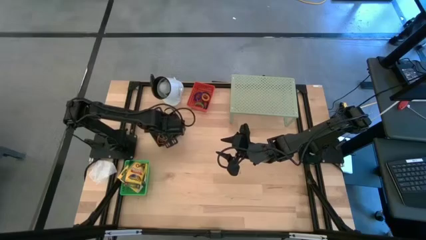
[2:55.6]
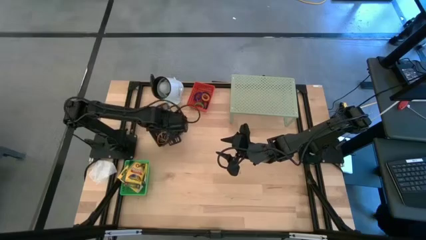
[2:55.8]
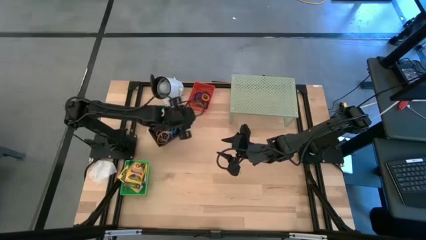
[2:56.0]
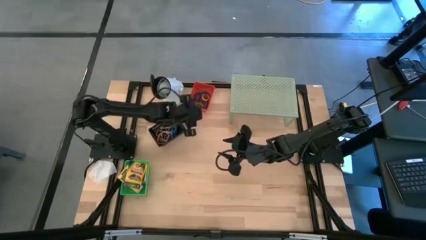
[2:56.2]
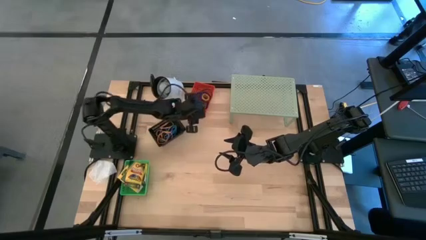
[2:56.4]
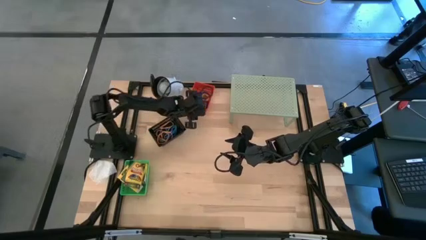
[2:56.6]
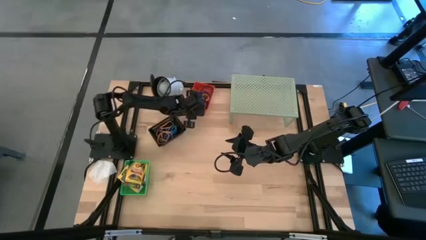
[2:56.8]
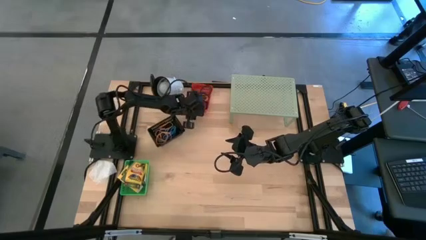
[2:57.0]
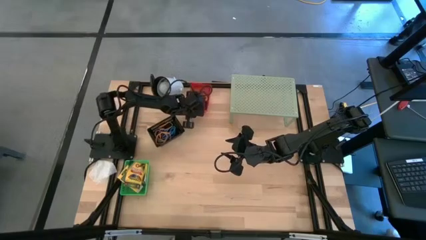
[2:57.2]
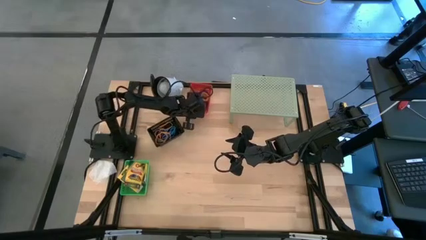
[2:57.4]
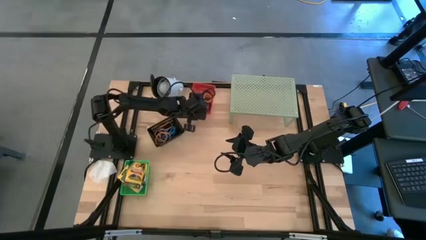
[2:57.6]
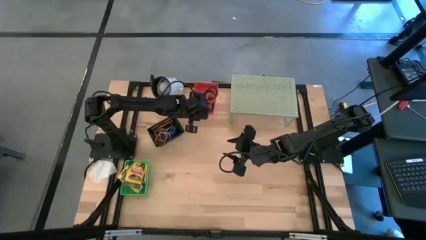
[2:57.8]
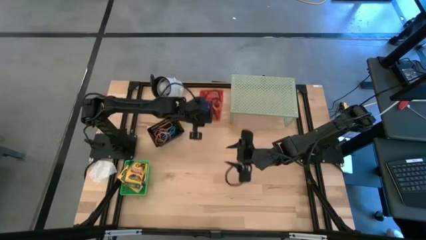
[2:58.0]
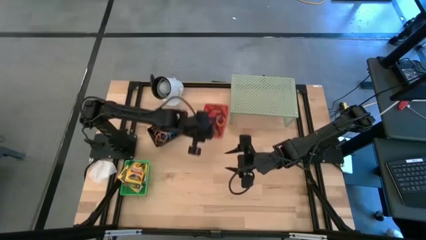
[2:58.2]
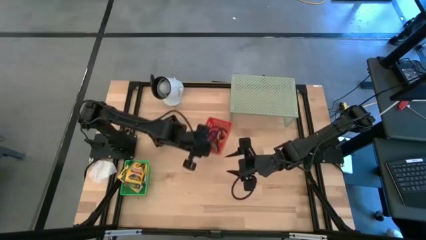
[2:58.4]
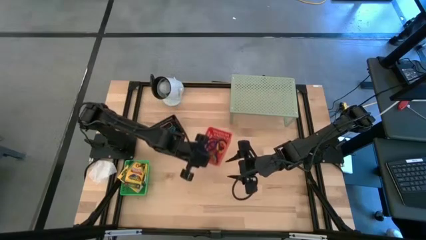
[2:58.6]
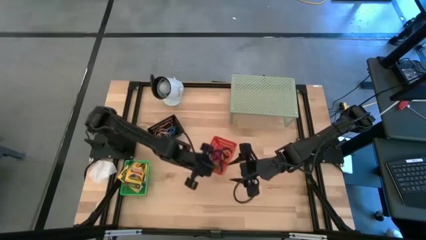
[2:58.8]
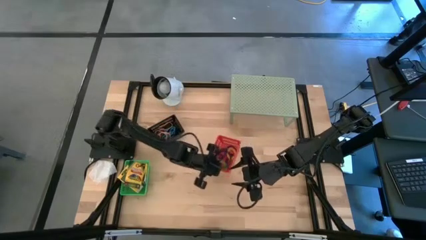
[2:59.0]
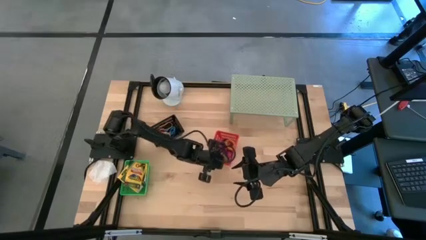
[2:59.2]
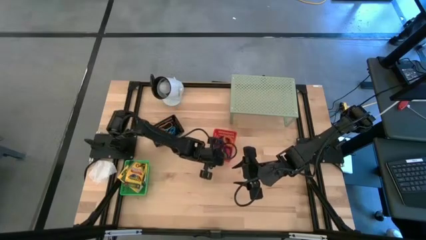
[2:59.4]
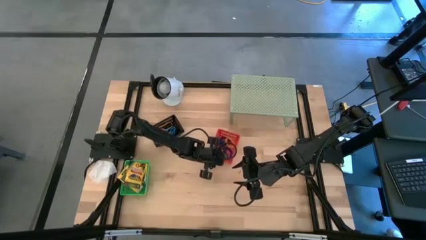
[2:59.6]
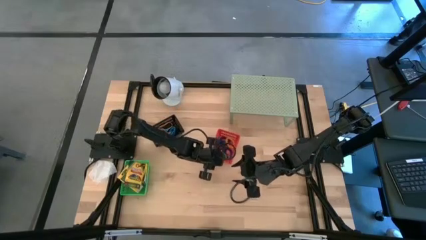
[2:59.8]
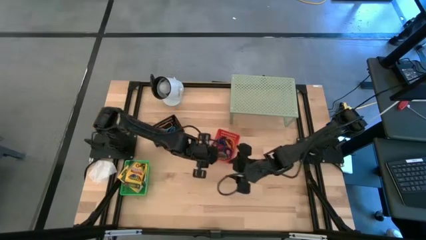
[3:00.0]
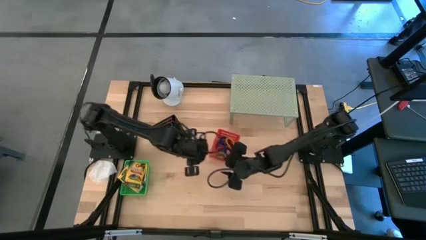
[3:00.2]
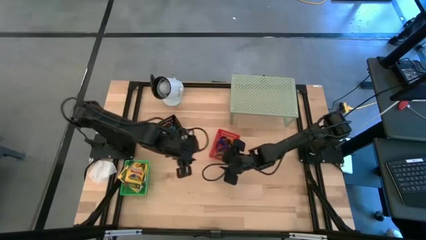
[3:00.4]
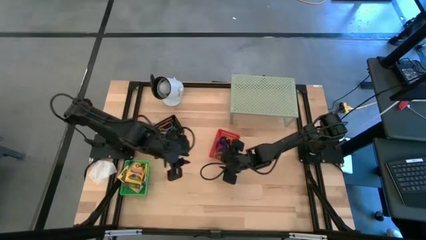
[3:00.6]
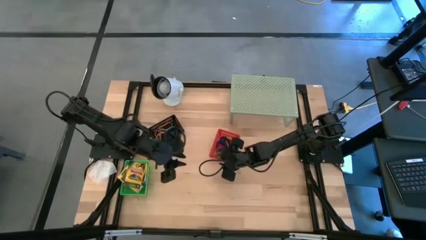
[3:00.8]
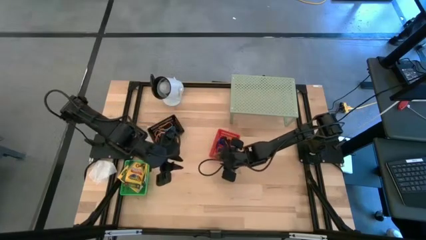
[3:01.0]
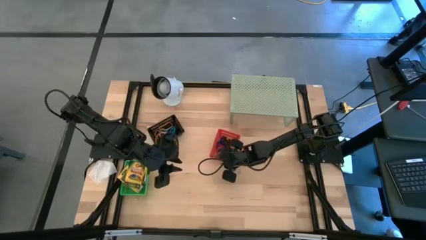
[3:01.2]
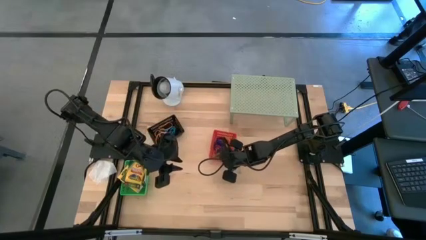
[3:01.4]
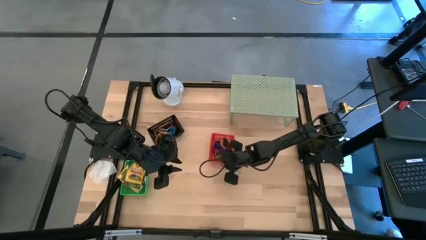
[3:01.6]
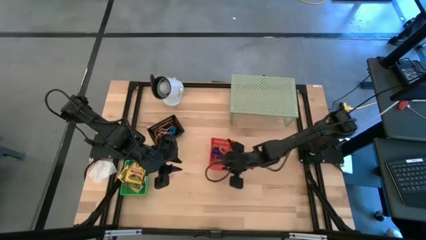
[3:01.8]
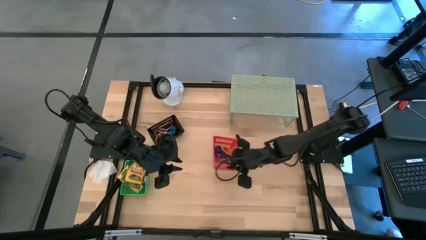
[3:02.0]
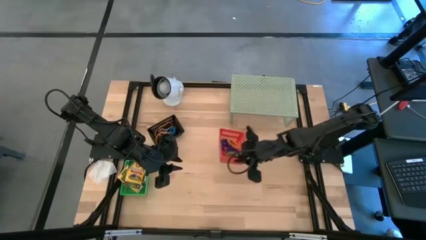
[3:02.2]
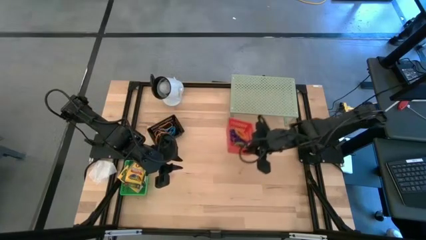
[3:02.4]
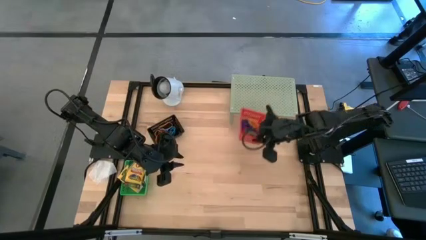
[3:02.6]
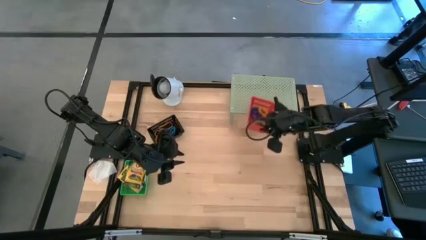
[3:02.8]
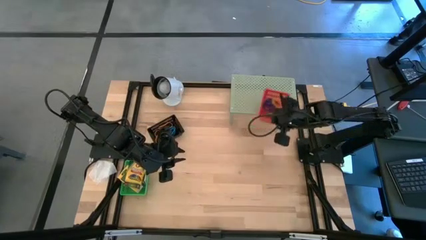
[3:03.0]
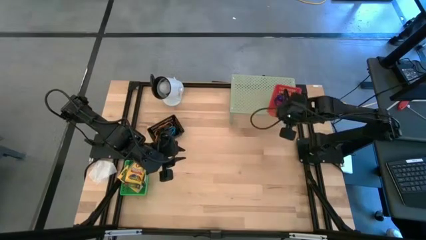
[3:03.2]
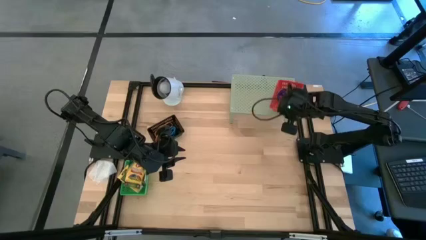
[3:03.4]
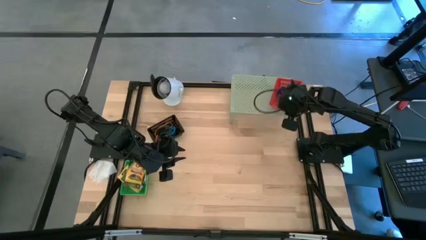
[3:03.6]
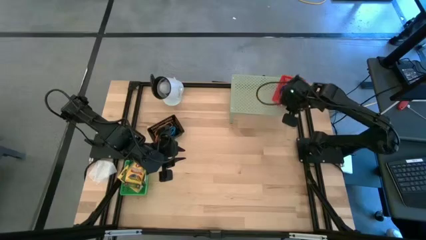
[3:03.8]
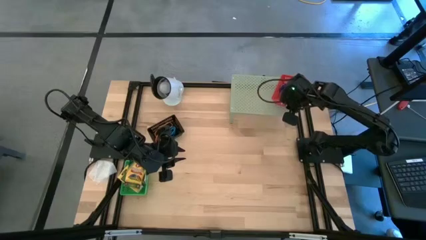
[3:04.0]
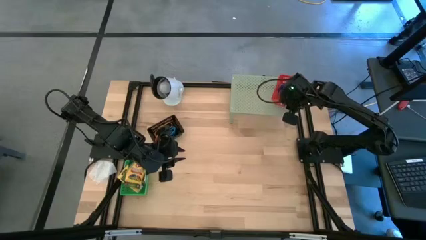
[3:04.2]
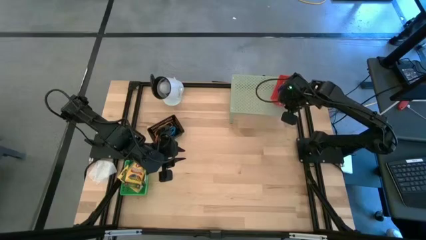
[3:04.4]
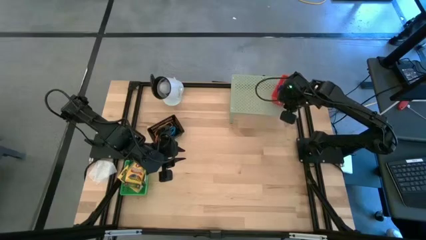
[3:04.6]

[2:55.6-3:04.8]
Task: Pick & Place Office Desk Supplies
Put the red bin on the shelf

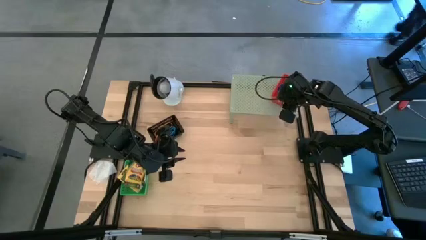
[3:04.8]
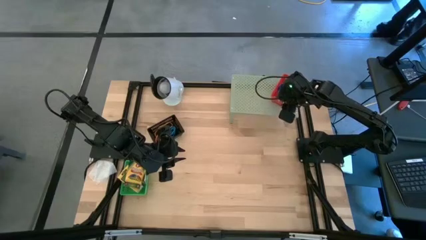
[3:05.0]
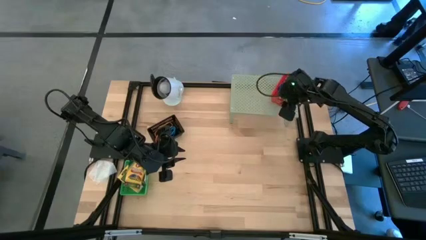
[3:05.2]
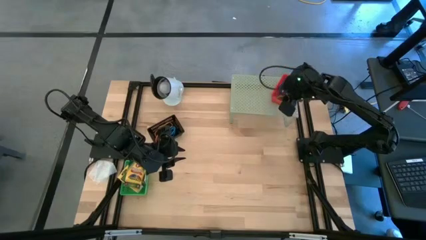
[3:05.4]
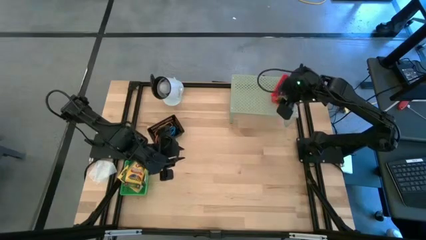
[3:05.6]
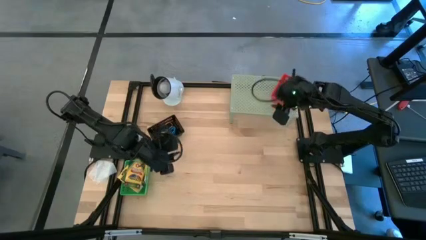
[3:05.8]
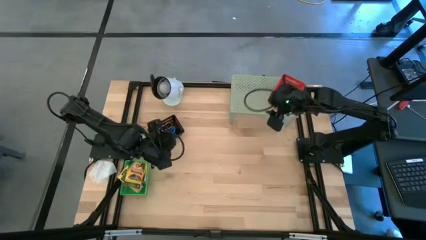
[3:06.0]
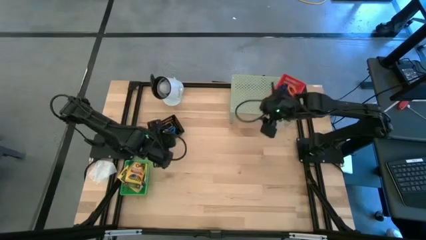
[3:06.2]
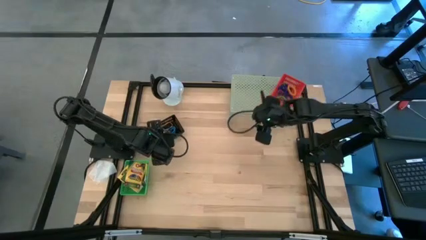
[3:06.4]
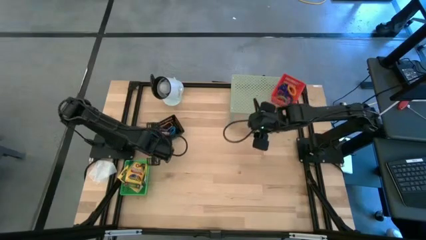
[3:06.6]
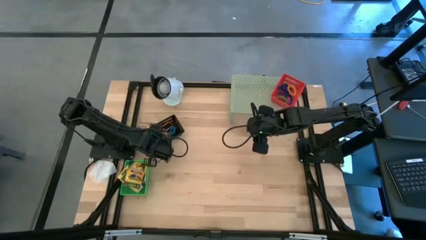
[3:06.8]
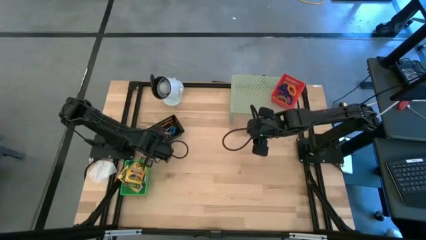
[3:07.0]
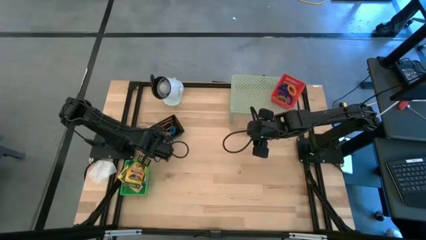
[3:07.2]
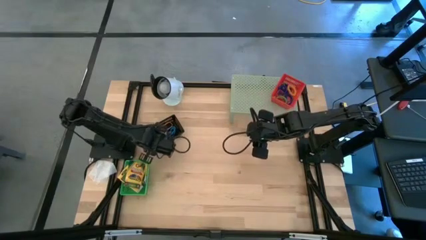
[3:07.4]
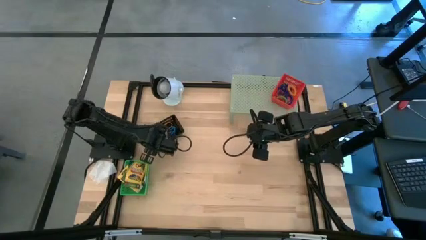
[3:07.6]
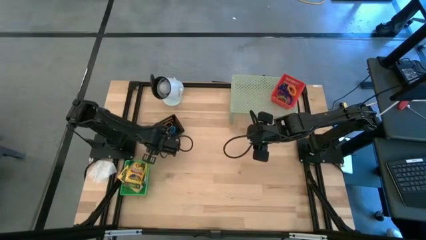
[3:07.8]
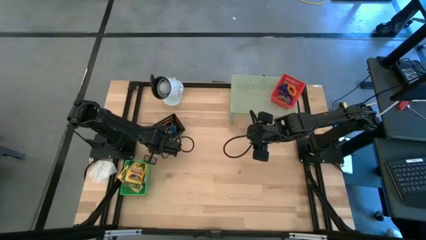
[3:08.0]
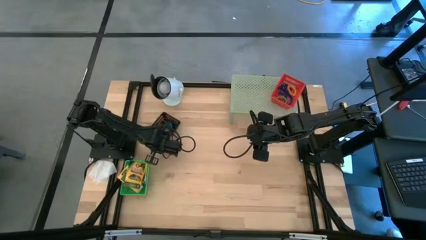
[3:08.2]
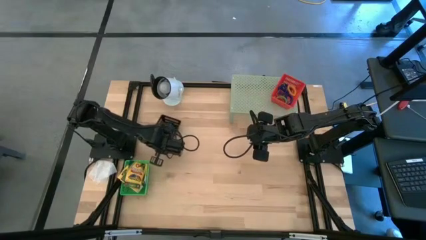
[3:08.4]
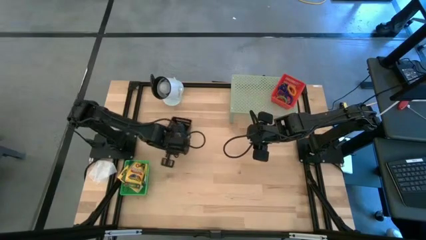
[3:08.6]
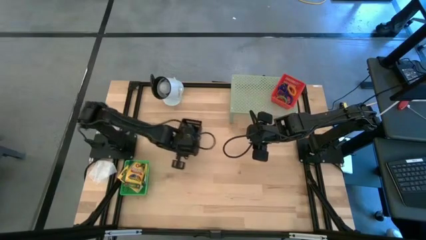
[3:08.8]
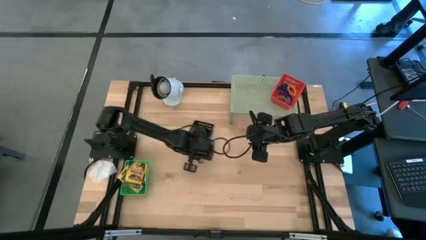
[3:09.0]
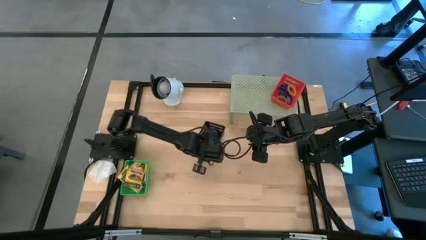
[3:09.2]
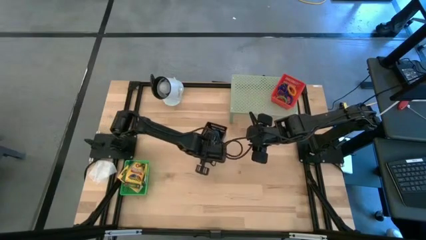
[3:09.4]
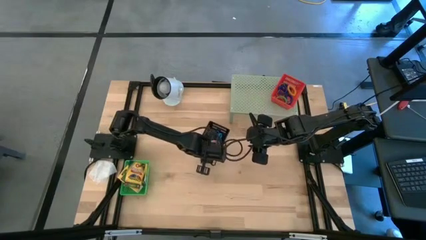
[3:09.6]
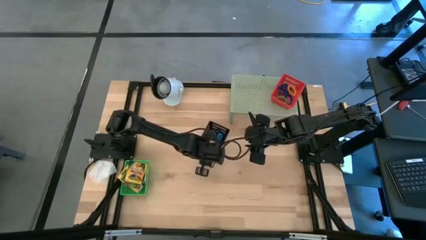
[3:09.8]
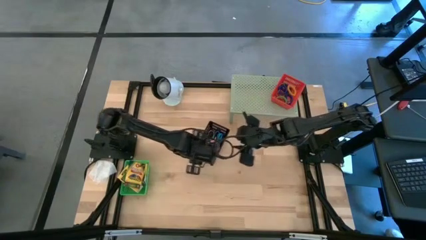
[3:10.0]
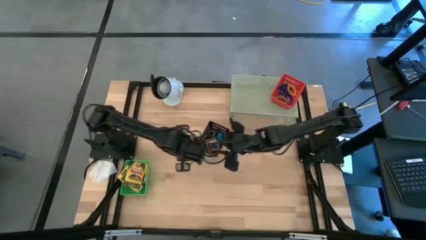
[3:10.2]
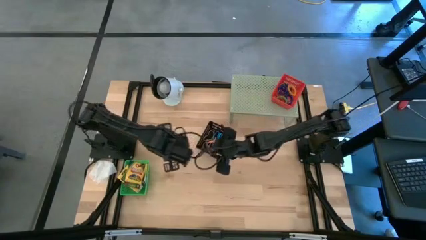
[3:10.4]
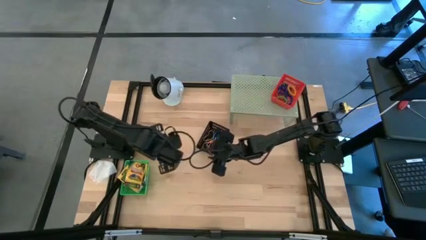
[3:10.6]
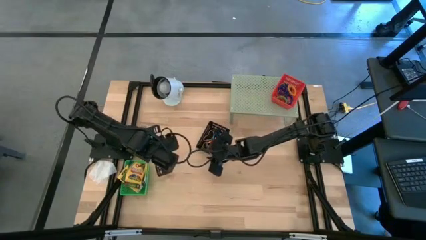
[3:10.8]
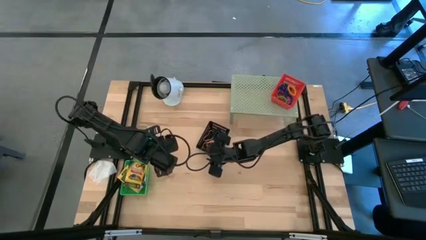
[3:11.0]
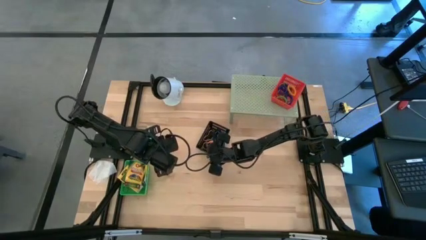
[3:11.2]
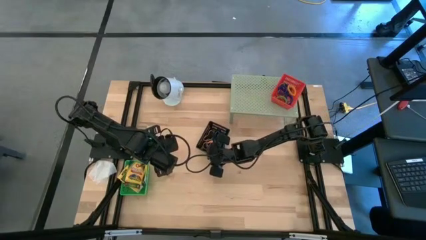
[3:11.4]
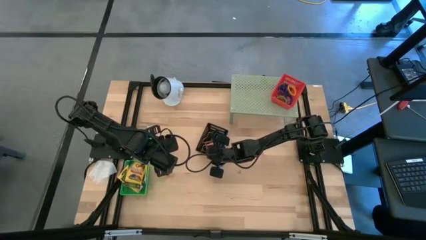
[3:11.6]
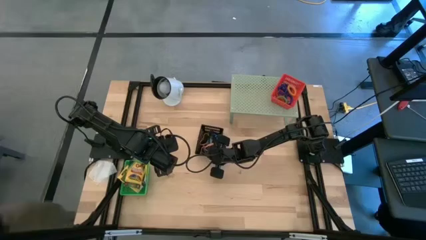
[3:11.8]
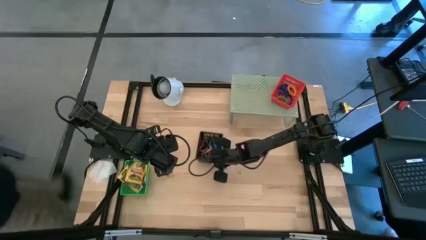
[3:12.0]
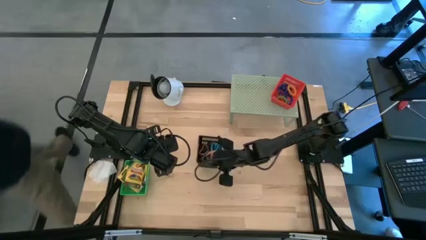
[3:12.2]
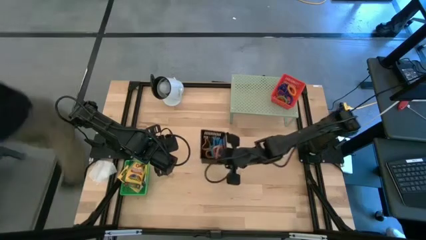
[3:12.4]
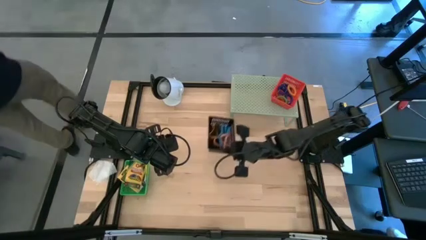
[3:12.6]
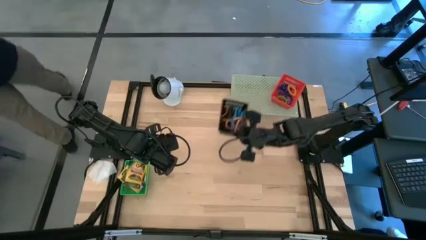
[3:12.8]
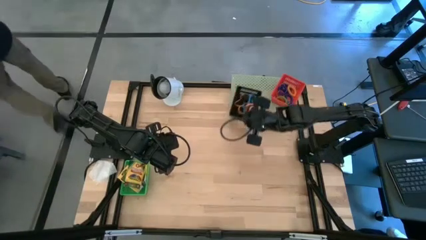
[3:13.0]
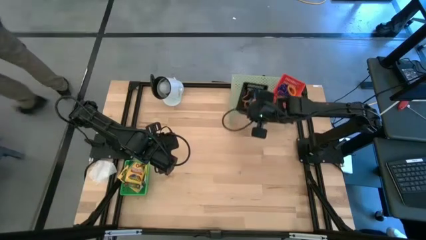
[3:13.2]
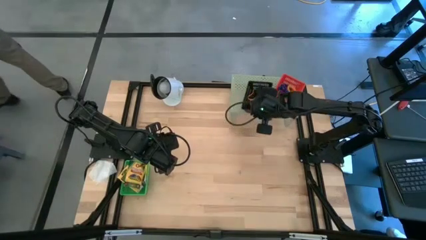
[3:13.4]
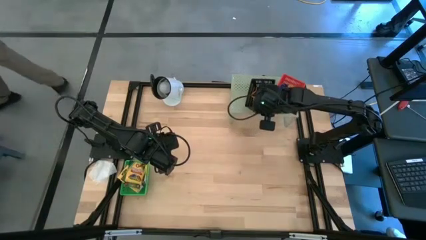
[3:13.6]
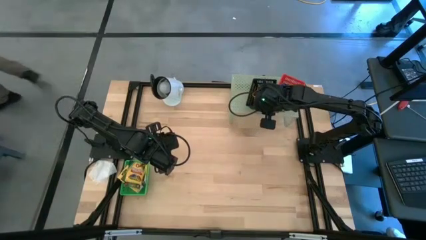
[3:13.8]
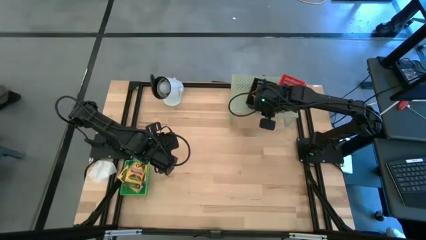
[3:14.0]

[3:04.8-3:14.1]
Put the black bin on the shelf
